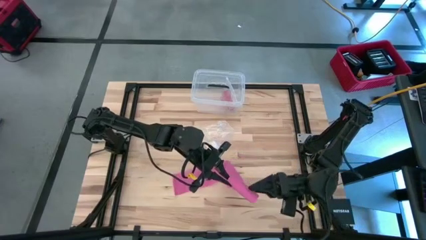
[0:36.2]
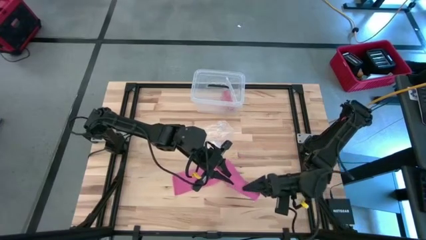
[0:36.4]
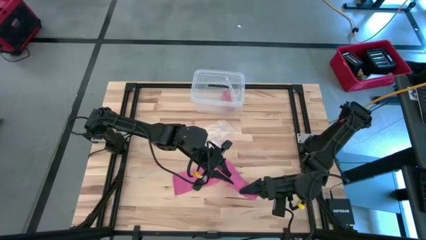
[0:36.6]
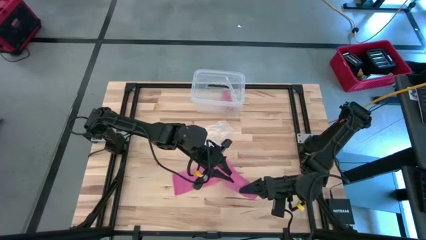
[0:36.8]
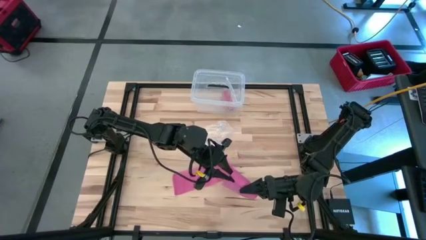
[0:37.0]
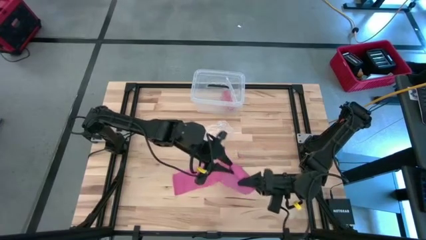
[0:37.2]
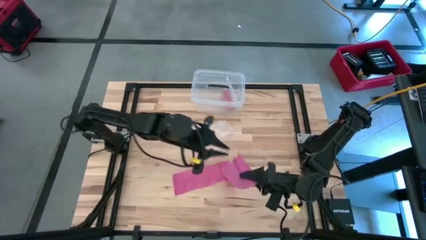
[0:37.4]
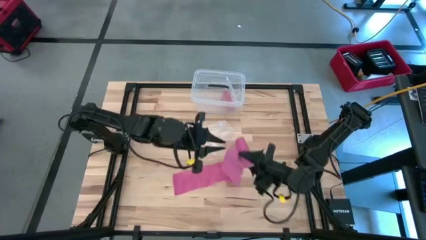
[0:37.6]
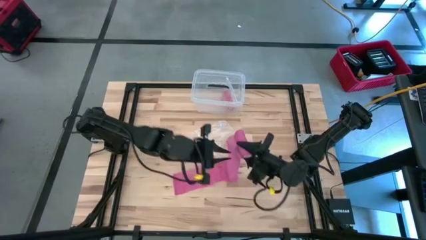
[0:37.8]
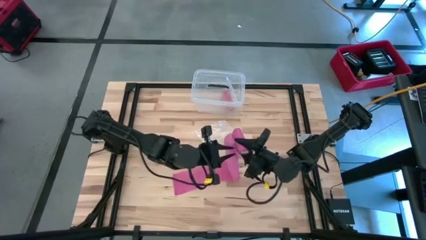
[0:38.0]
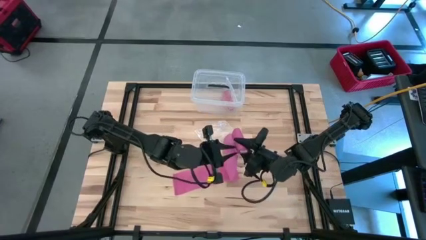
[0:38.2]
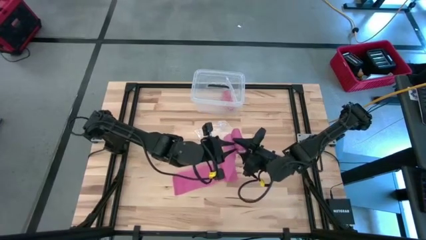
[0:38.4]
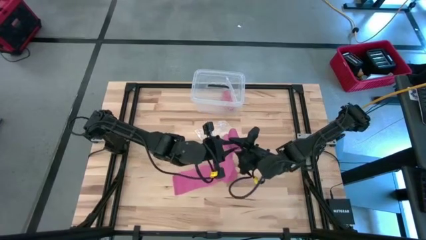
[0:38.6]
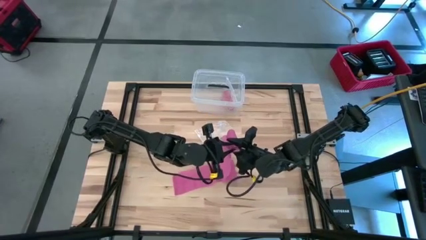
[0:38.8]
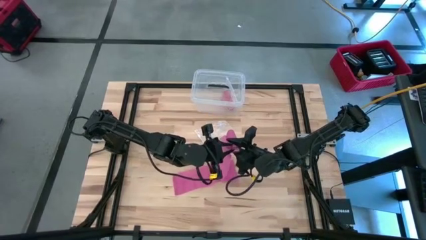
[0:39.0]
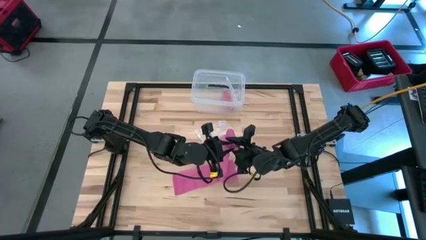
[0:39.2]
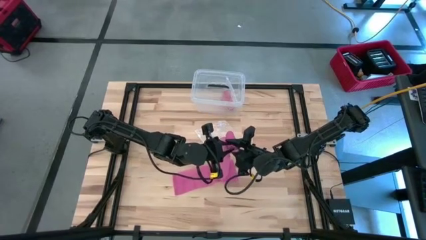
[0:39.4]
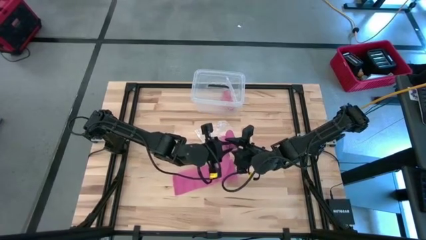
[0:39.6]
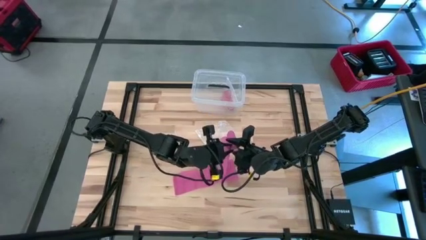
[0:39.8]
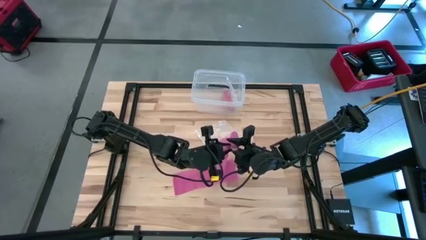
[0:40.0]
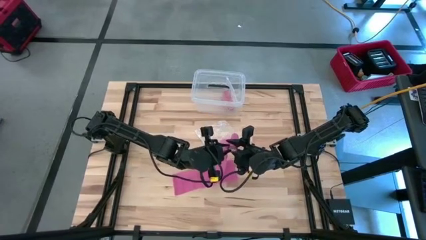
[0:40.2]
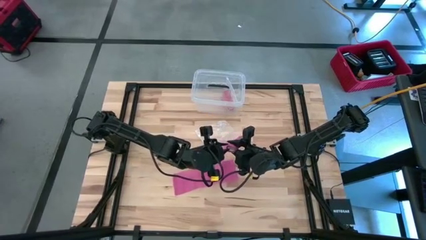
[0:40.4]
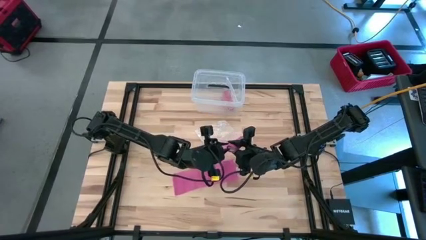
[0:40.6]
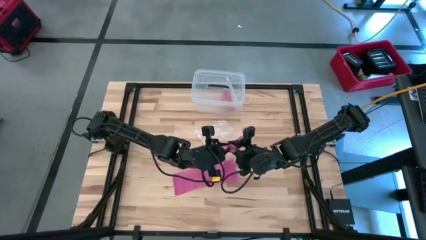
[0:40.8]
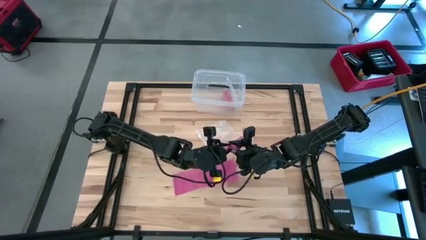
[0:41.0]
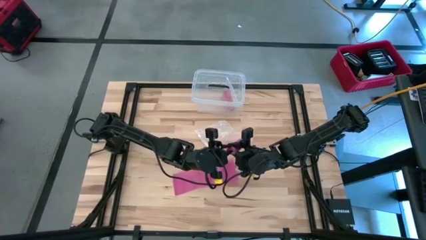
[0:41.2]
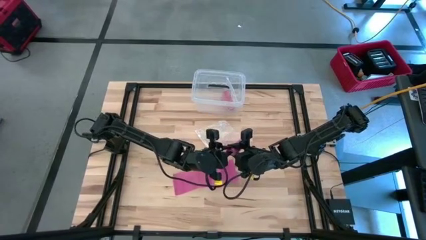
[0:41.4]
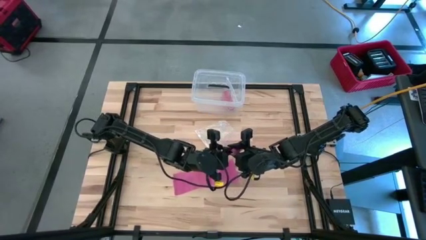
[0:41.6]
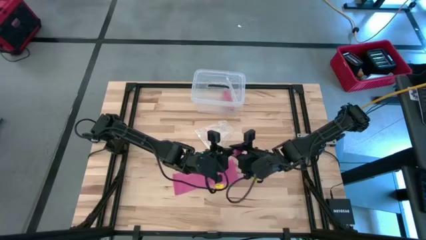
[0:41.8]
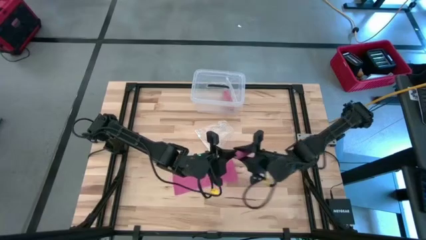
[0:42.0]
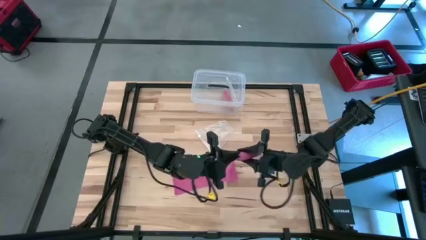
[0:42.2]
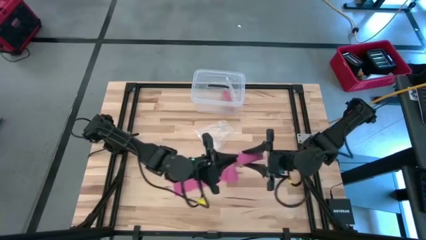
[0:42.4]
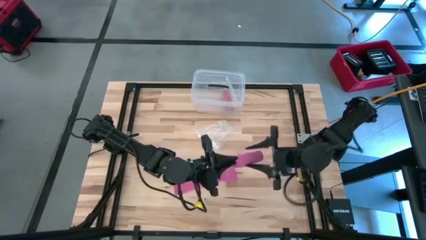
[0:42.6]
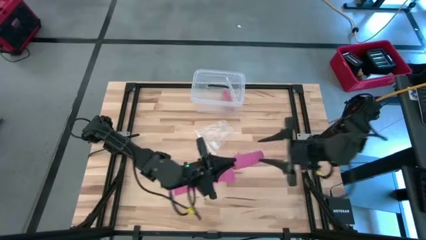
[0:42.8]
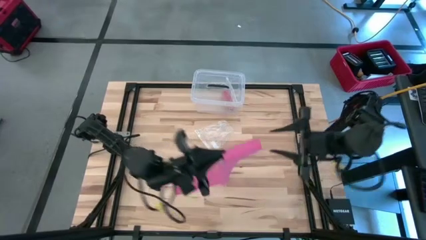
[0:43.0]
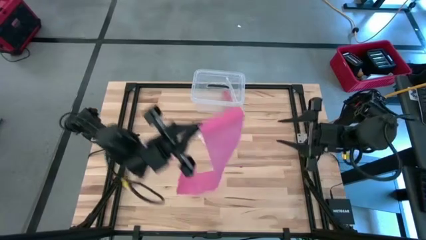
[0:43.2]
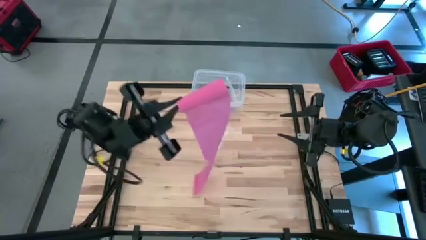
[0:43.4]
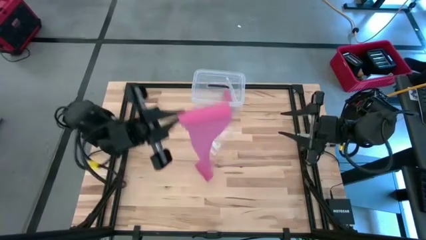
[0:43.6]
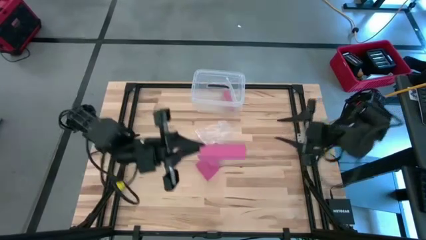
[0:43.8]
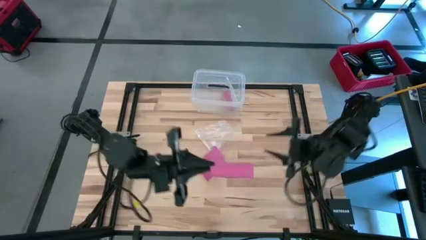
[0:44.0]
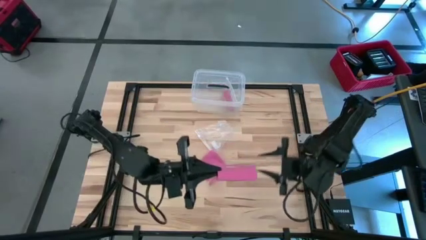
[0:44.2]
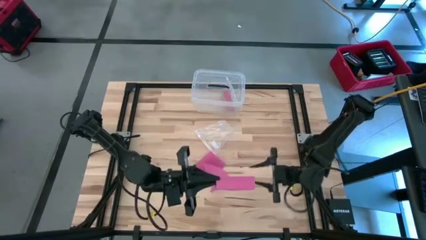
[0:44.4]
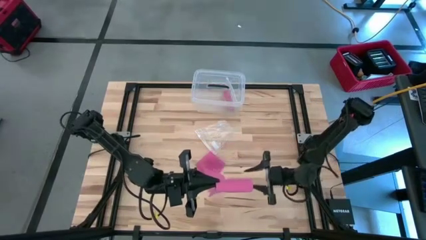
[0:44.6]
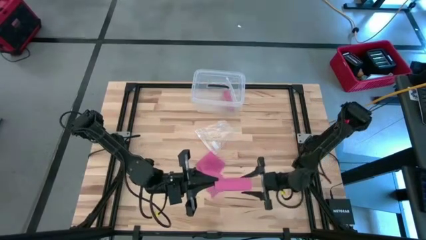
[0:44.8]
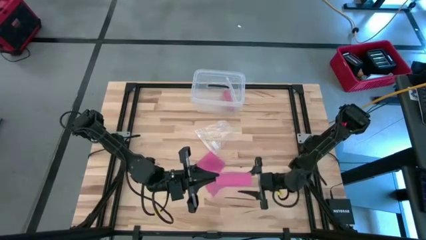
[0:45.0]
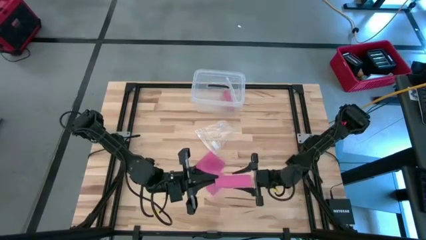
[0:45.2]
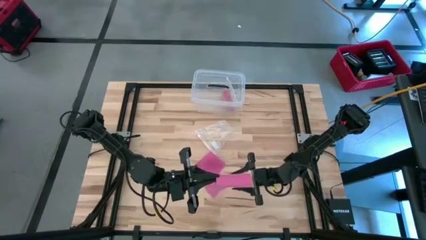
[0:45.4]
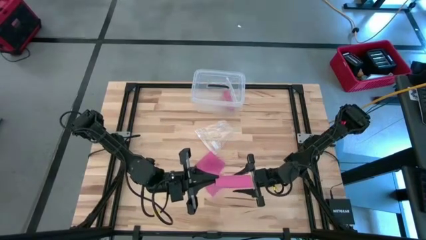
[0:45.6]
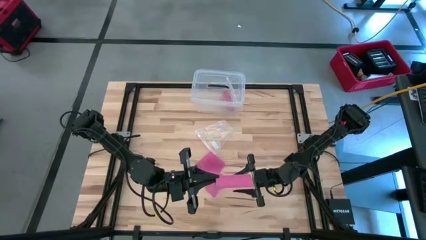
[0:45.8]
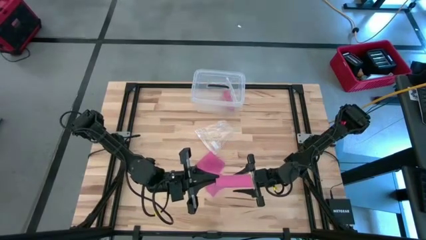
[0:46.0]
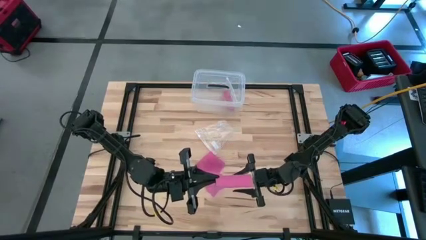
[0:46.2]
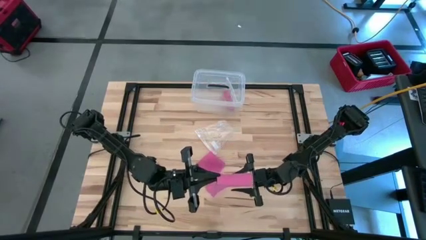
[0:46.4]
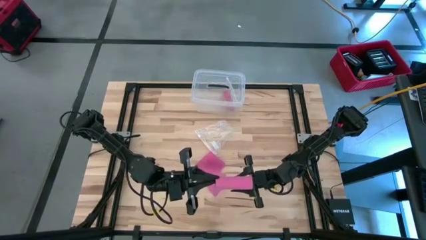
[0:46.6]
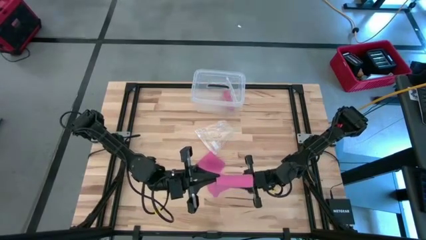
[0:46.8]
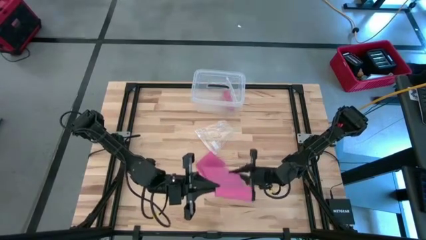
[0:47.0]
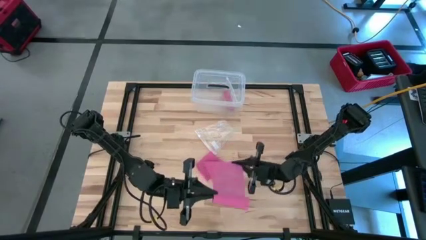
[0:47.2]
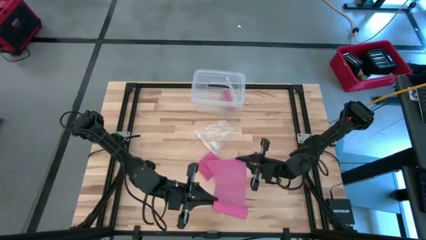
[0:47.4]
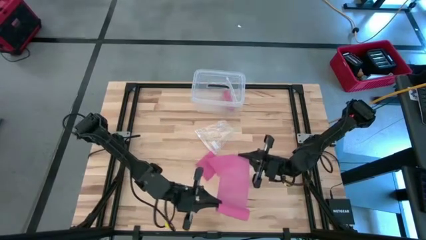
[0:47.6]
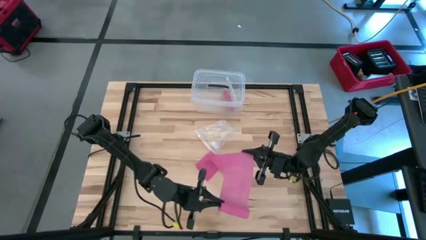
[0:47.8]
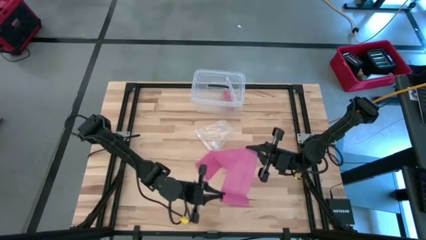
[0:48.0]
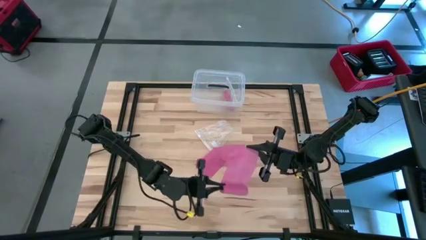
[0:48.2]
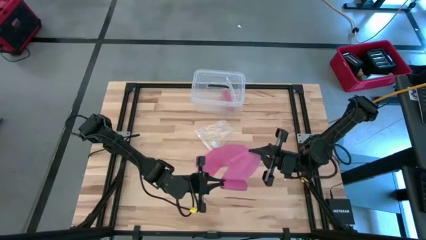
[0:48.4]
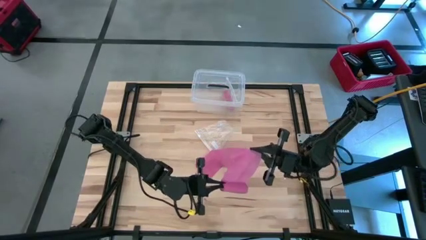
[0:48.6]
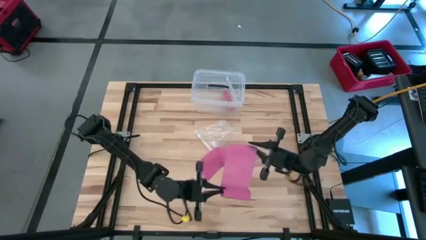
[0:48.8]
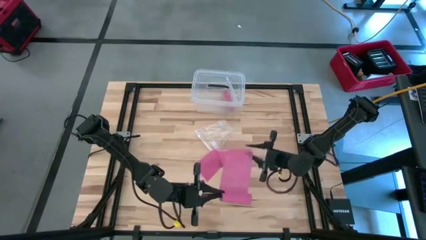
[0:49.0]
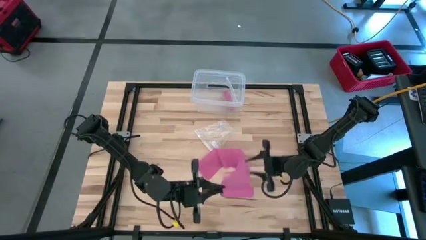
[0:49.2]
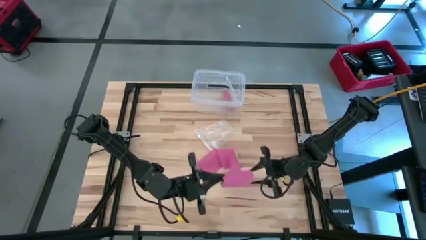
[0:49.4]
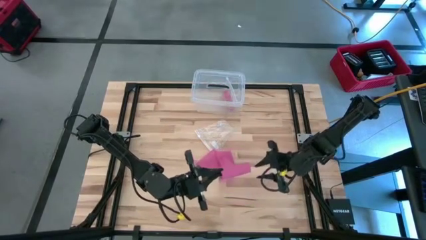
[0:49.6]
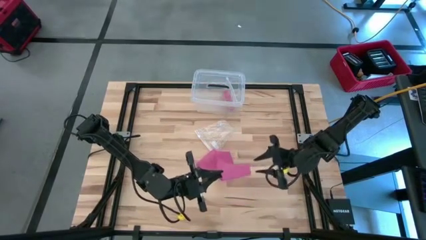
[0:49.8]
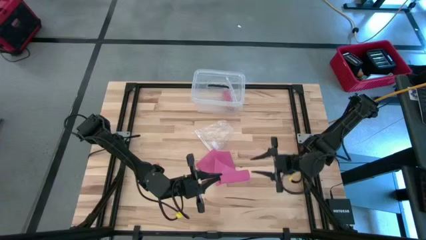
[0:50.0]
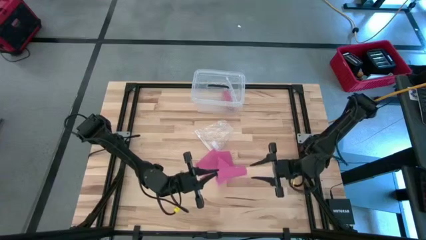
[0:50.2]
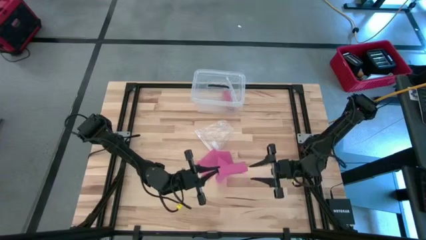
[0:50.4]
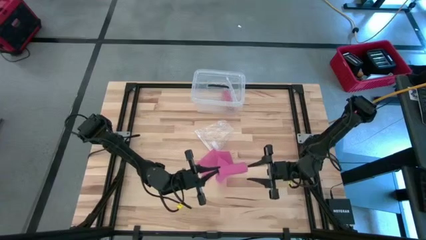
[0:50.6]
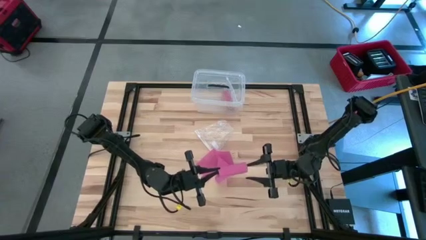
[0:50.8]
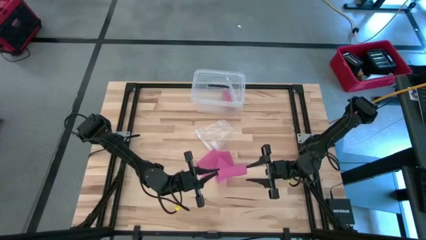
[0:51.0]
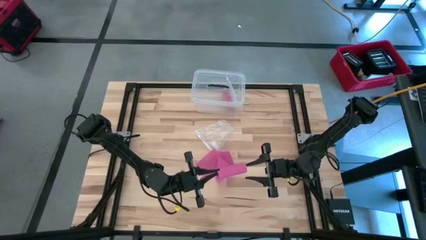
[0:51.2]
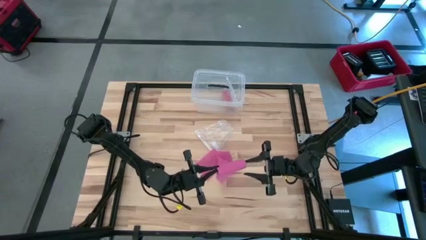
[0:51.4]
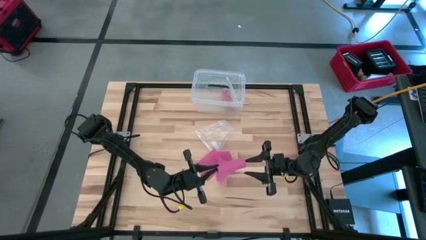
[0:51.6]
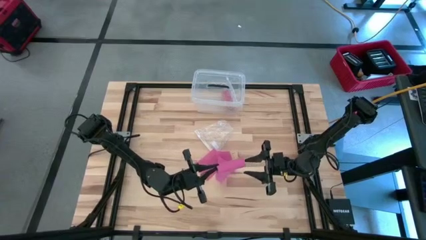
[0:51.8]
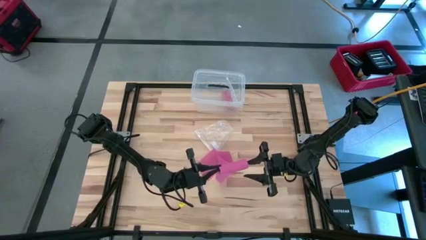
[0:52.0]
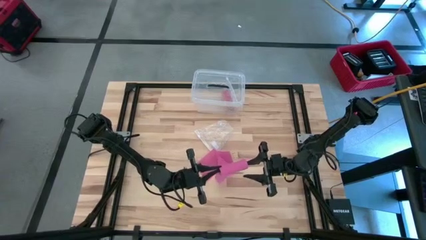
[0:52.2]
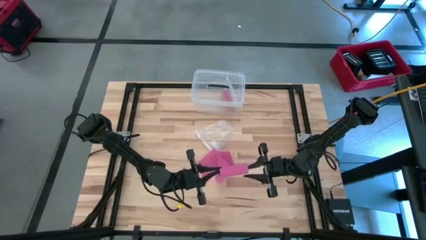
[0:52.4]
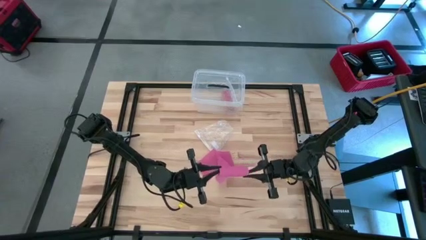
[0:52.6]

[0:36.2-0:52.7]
Task: Roll bandage
Roll the pink bandage
